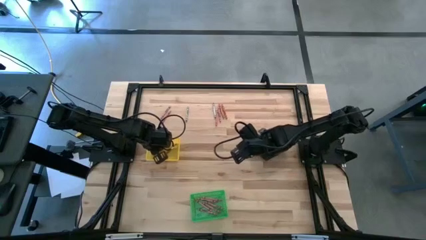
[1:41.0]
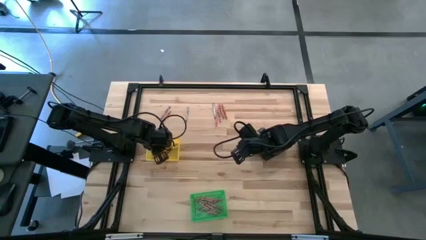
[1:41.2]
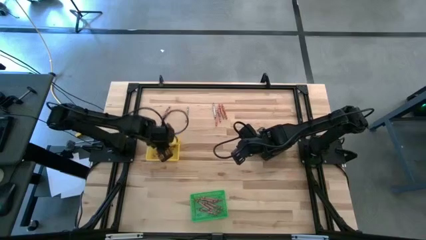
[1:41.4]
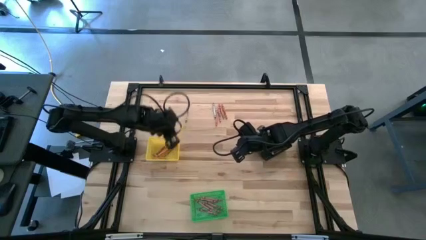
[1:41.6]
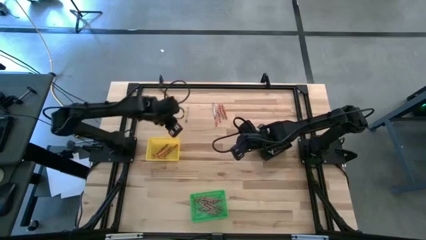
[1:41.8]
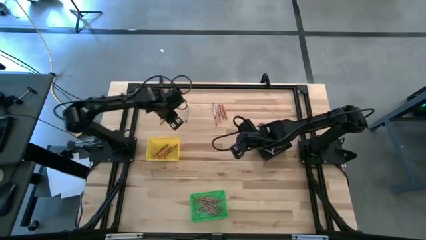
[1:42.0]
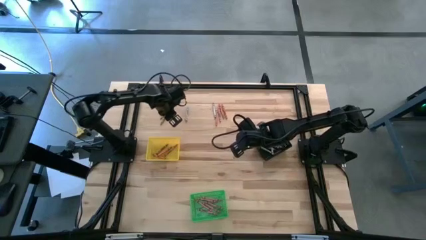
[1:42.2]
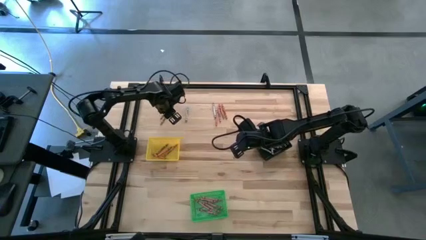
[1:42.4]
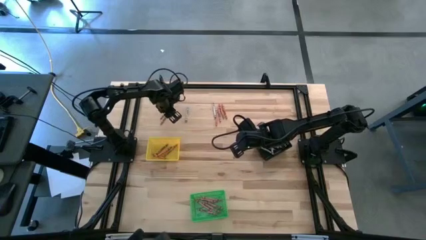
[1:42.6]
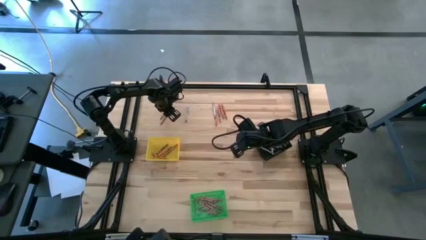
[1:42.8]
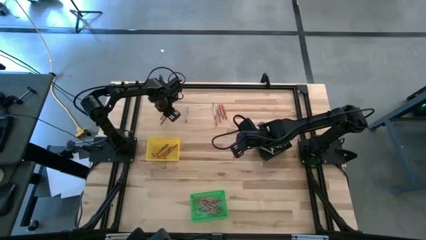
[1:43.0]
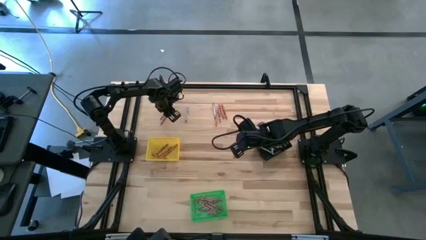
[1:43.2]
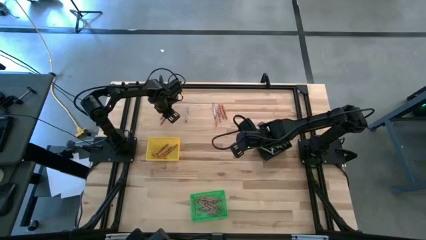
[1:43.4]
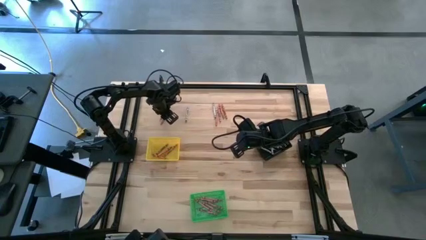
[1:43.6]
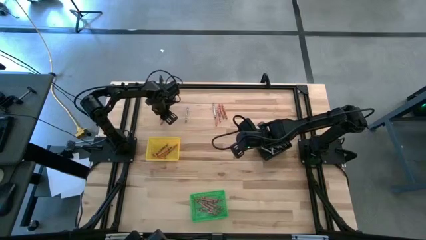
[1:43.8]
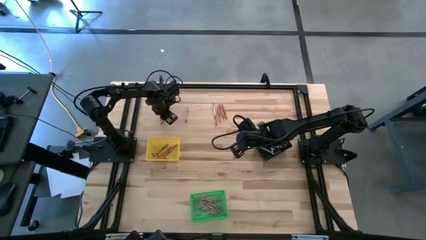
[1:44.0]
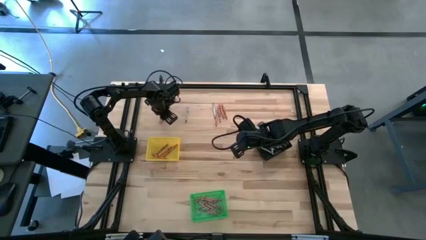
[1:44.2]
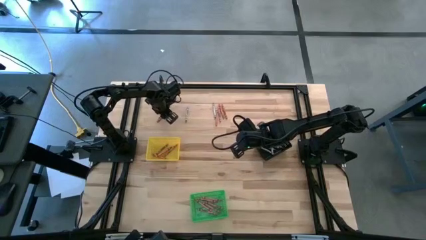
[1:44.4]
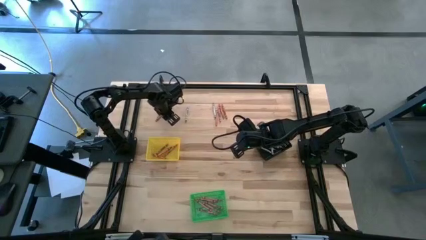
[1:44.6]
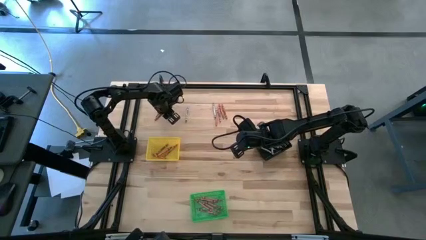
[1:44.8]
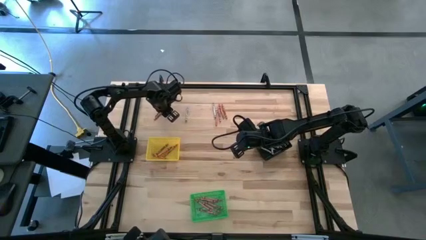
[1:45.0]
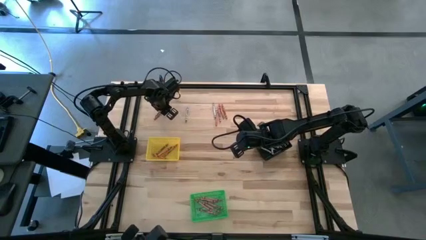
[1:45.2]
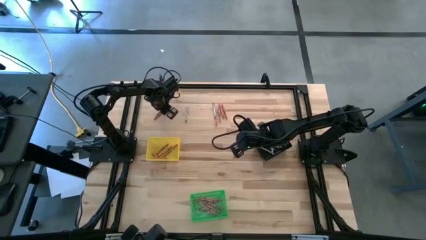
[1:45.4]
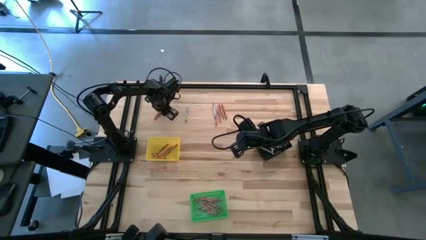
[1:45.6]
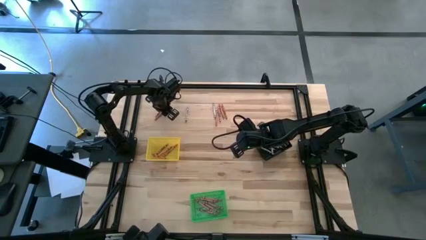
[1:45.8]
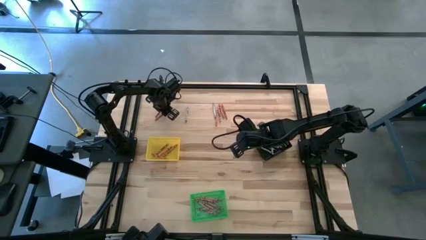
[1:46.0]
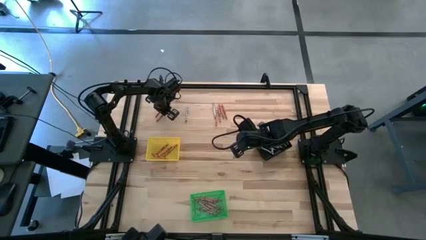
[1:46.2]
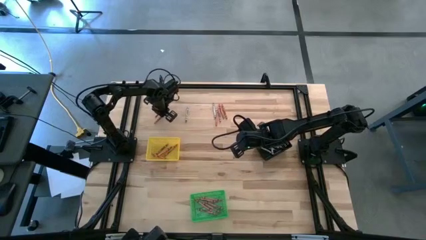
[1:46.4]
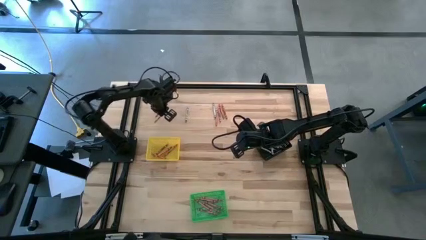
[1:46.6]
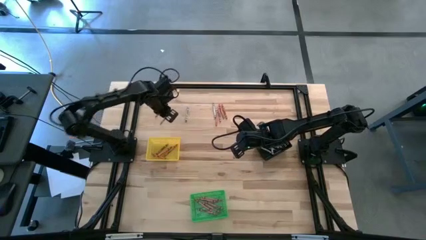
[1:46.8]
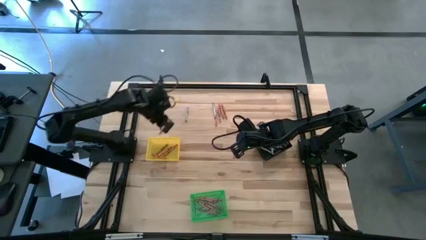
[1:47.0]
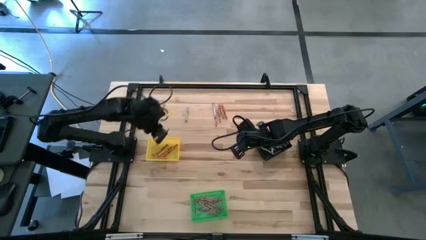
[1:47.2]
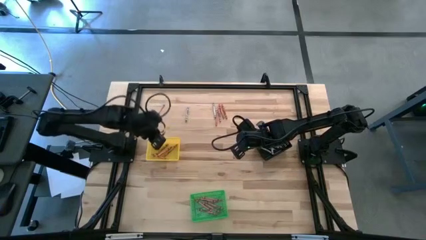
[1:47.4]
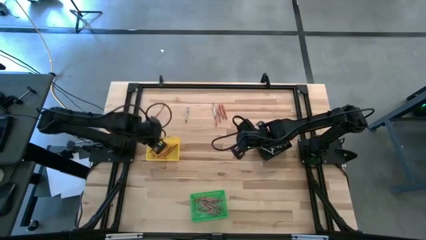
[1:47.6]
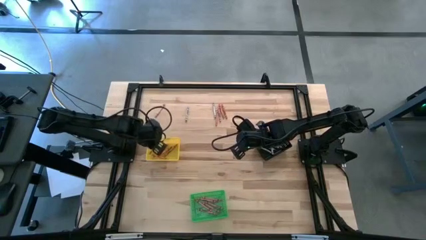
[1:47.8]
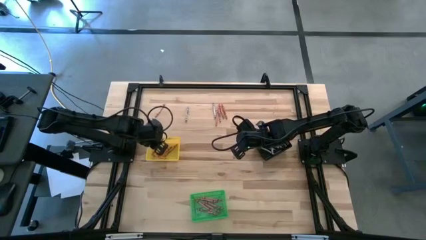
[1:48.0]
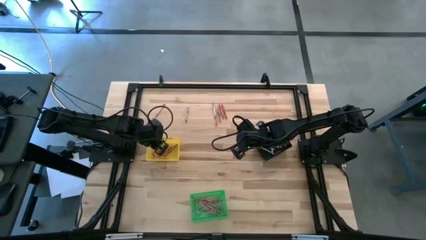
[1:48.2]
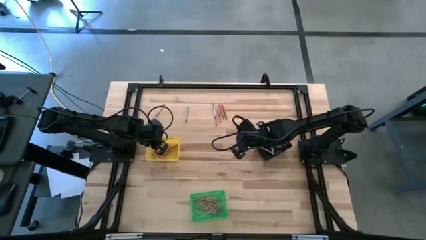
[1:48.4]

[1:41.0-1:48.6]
Task: Sort crayons
Put the orange crayon into the yellow bin

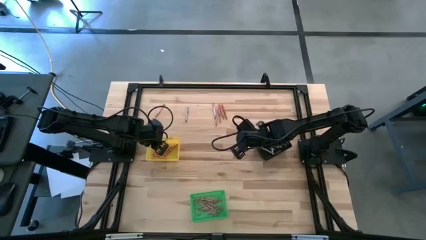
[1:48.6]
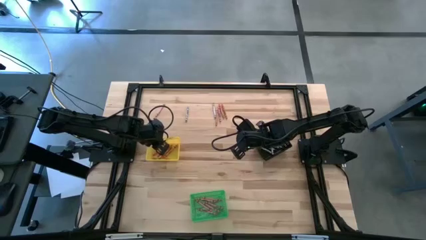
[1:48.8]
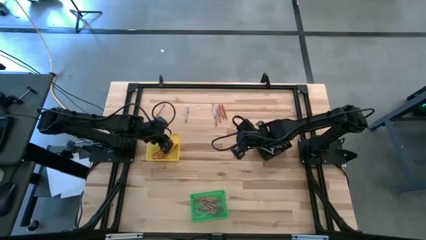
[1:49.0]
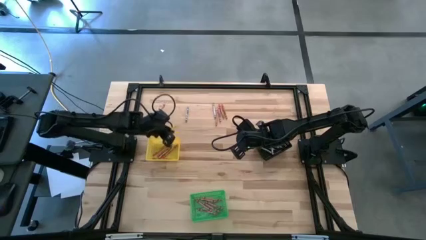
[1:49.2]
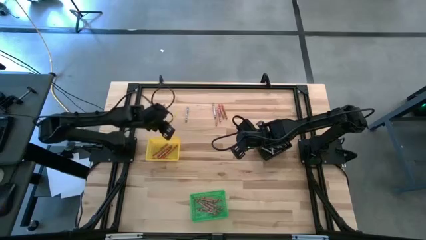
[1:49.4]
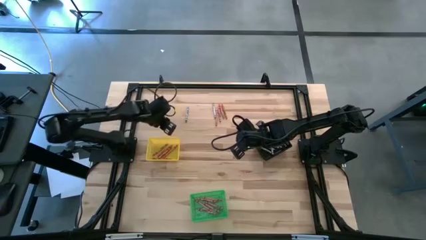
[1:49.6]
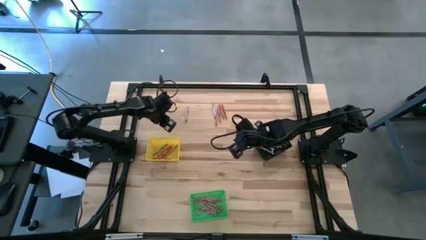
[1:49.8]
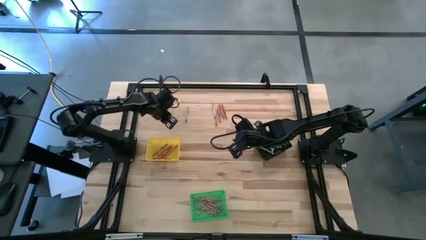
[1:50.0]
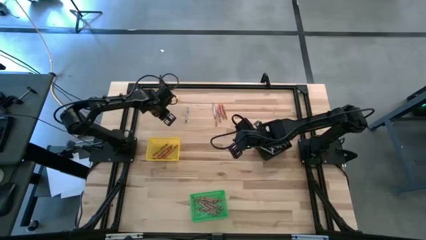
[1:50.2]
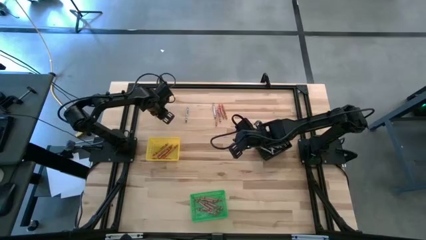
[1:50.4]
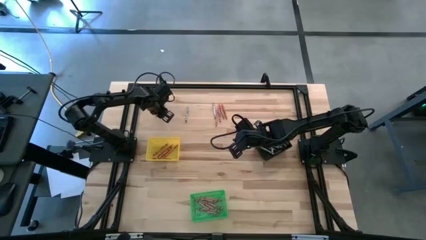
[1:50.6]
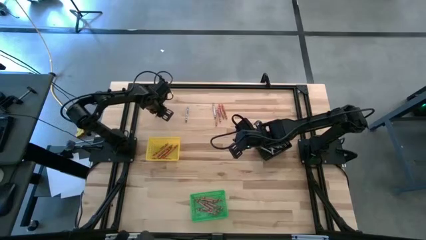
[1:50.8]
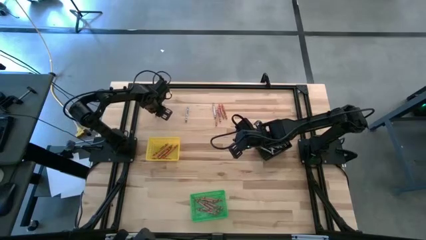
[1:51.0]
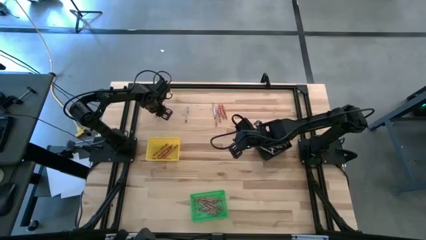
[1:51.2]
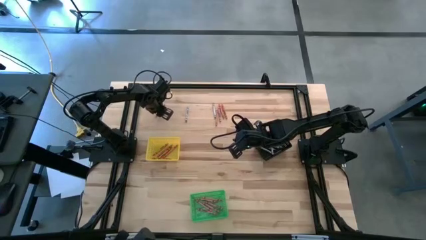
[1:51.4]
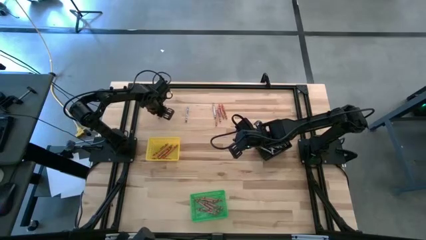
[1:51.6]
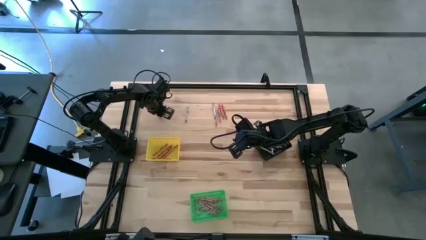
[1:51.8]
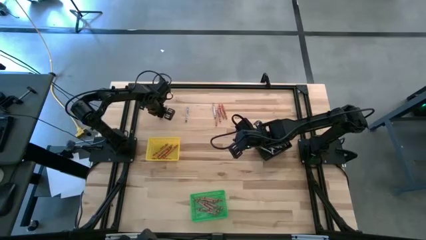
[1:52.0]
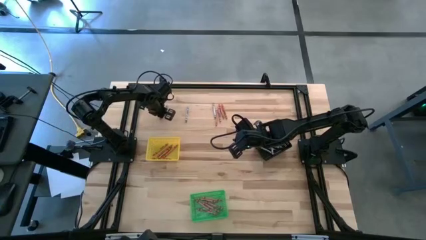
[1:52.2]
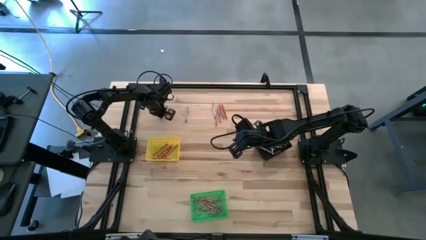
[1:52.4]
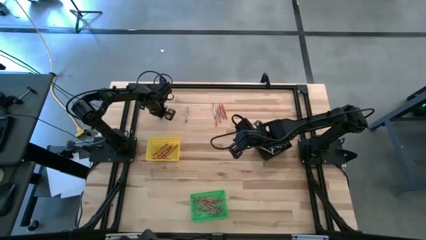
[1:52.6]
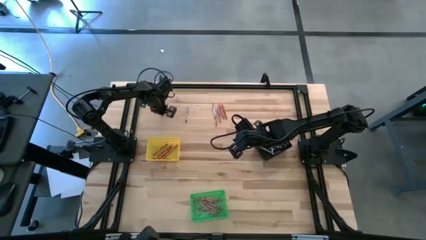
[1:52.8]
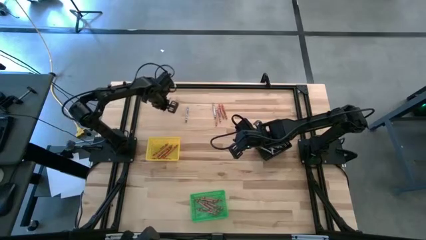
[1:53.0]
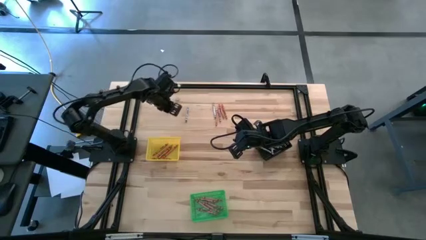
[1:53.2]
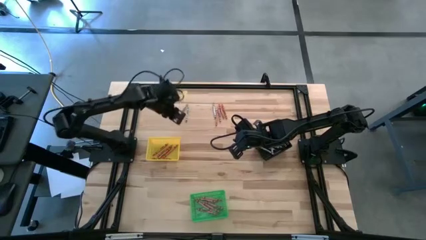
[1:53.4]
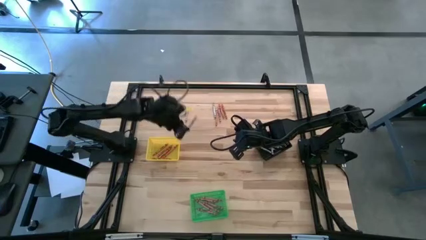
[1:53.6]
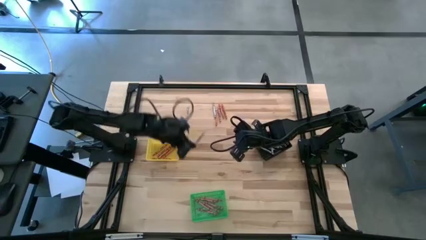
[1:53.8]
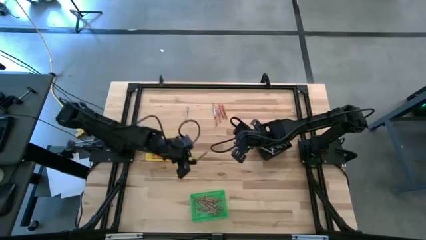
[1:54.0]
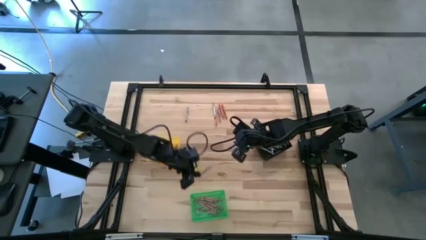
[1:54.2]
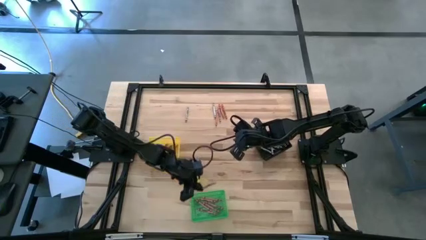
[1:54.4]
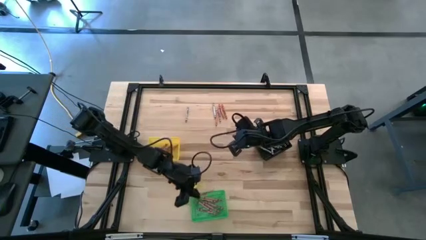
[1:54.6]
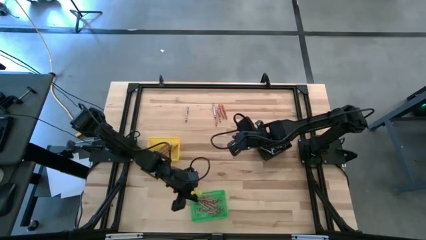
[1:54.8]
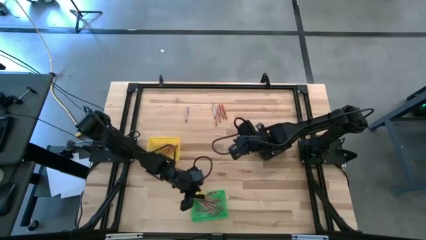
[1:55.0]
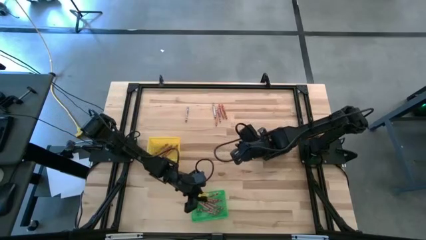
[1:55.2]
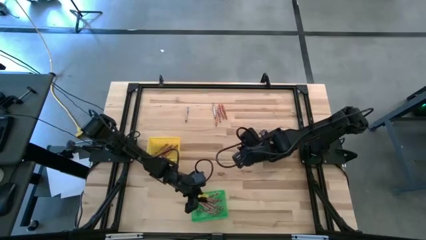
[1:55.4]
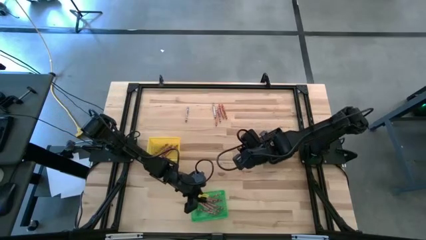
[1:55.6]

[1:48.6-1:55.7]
Put the left pink crayon into the green bin

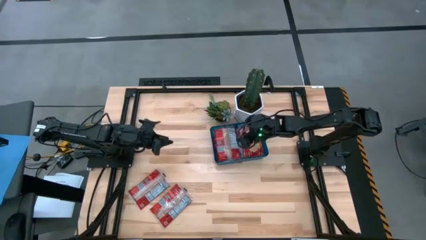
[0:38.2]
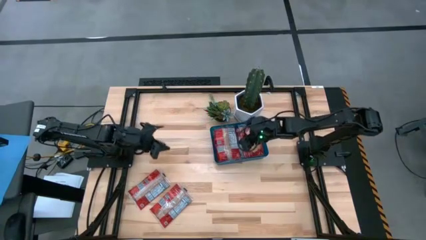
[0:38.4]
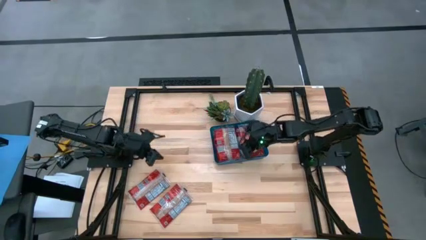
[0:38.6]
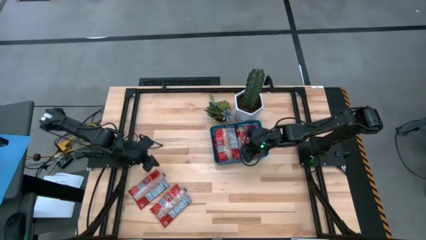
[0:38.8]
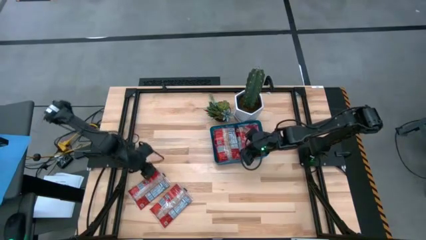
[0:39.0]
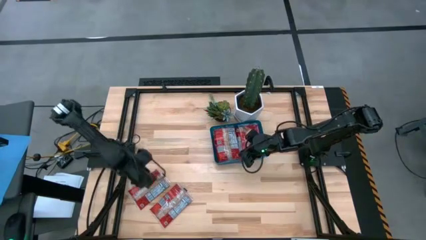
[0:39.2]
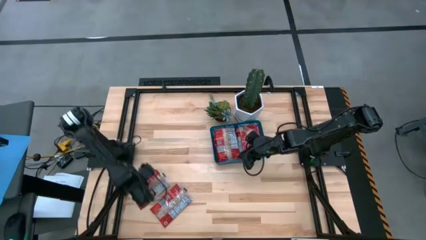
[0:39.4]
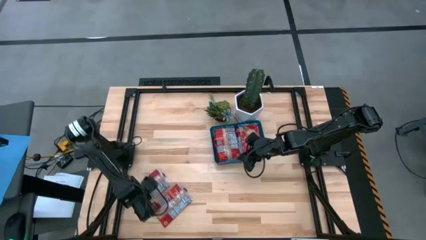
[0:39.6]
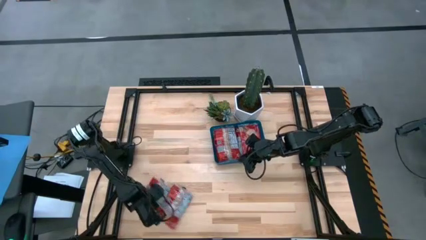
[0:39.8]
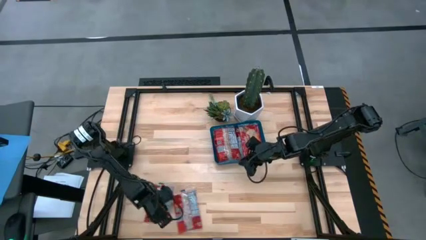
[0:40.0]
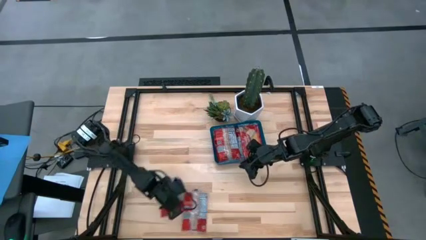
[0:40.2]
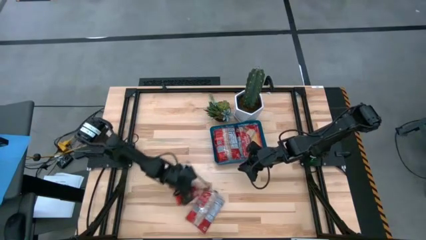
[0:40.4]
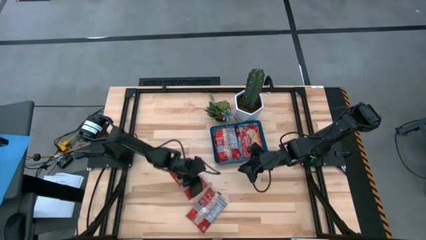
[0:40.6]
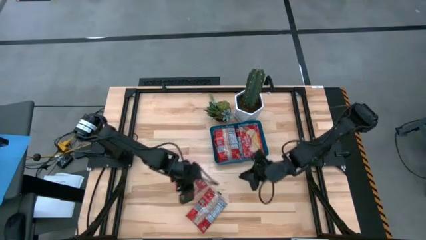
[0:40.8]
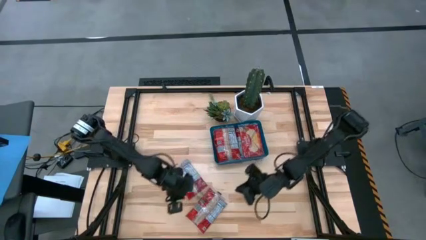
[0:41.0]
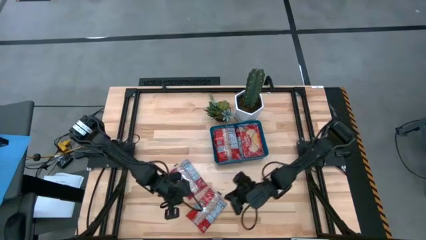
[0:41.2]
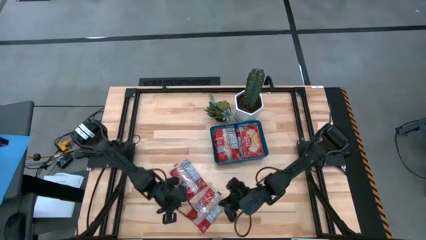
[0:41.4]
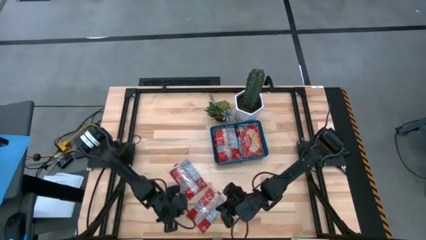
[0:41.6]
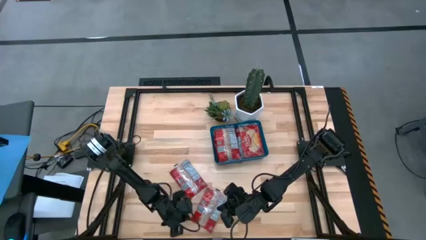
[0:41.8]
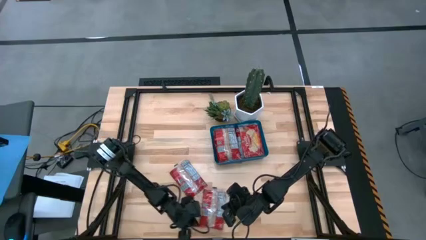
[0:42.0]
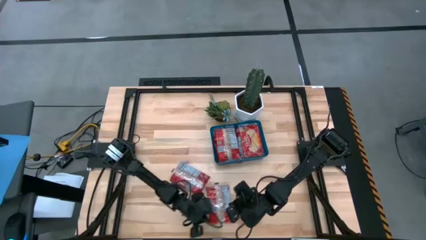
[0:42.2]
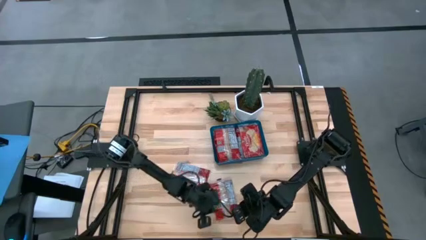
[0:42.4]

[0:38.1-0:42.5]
Task: Sort popcorn bags into baskets
Move the red popcorn bags to the center of the table
